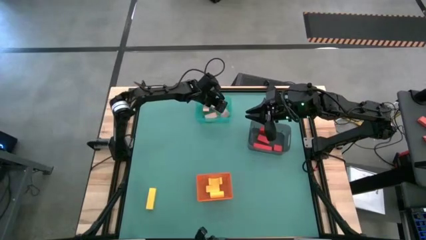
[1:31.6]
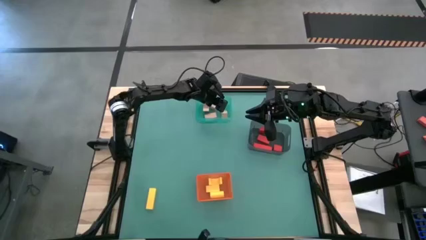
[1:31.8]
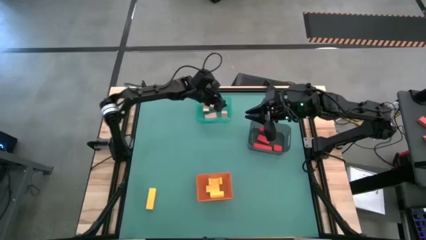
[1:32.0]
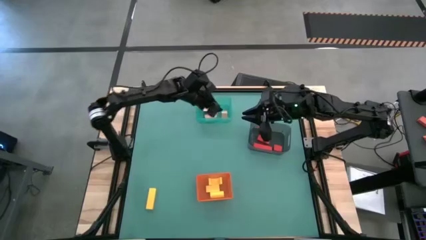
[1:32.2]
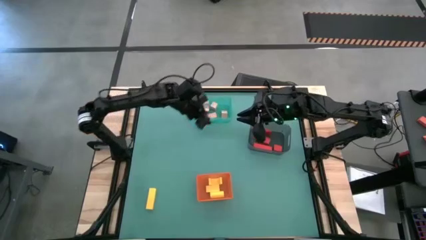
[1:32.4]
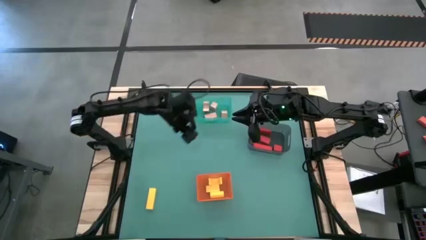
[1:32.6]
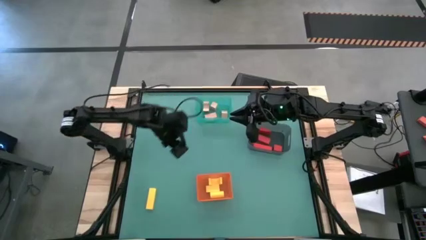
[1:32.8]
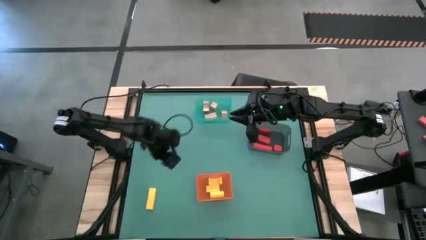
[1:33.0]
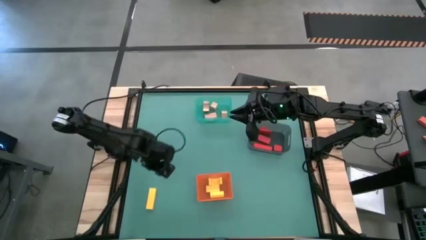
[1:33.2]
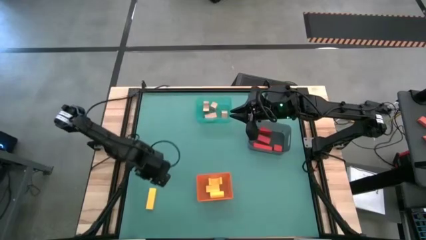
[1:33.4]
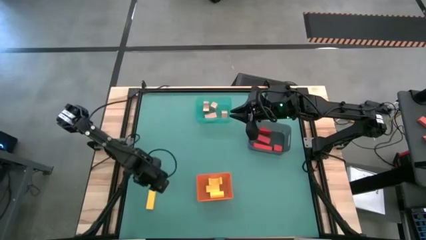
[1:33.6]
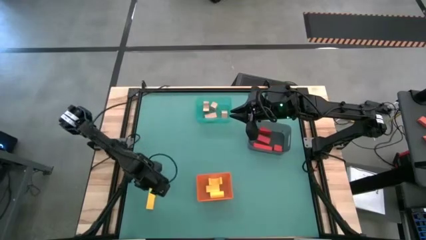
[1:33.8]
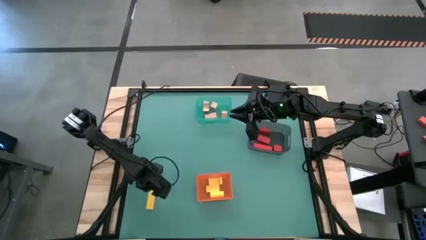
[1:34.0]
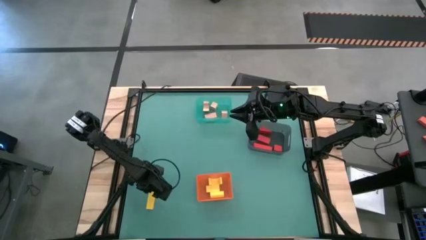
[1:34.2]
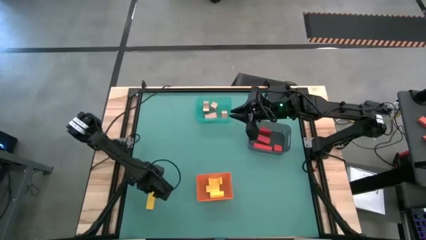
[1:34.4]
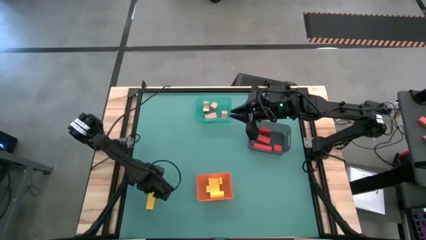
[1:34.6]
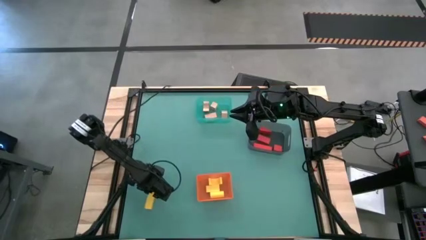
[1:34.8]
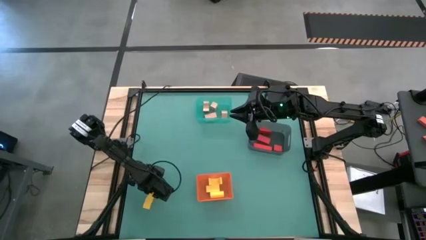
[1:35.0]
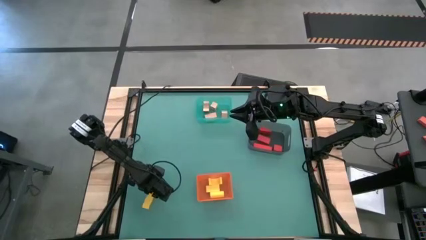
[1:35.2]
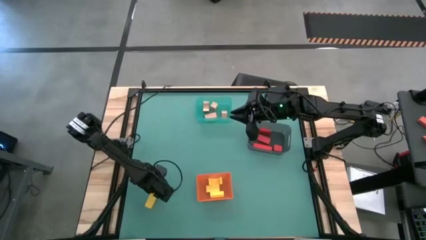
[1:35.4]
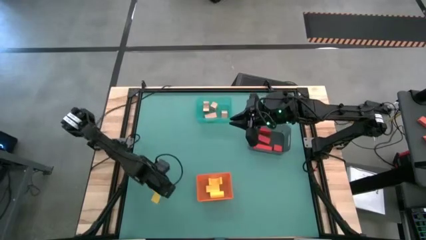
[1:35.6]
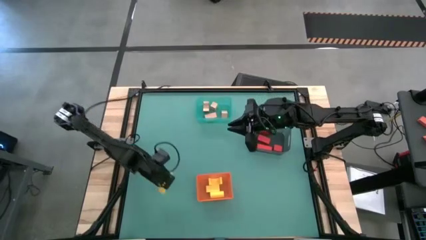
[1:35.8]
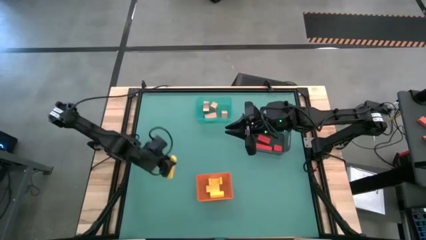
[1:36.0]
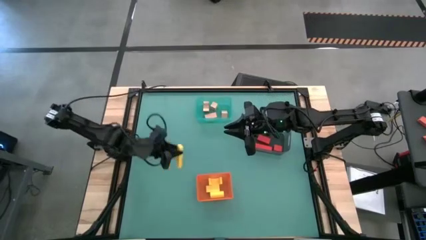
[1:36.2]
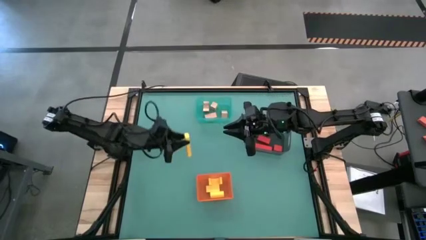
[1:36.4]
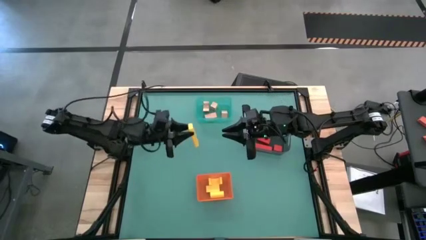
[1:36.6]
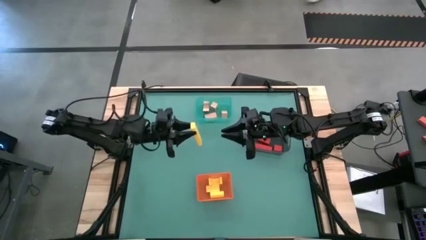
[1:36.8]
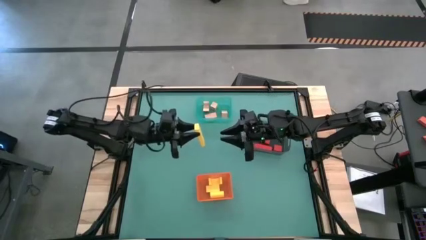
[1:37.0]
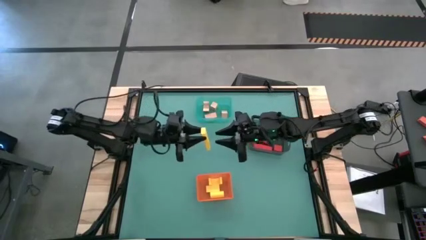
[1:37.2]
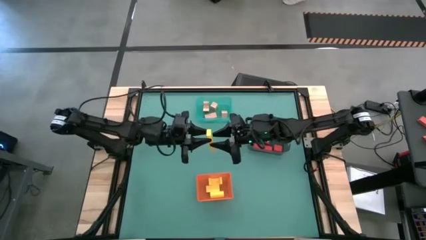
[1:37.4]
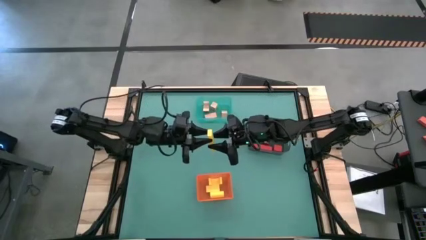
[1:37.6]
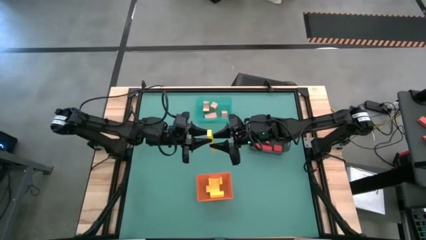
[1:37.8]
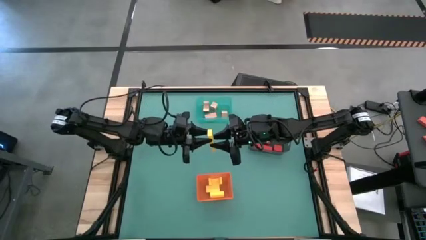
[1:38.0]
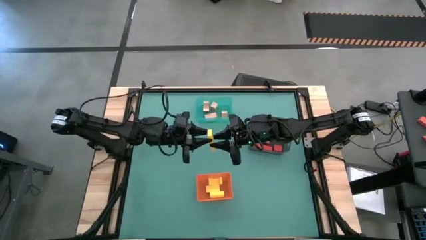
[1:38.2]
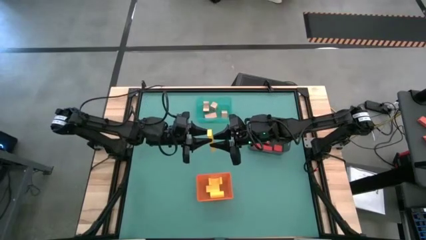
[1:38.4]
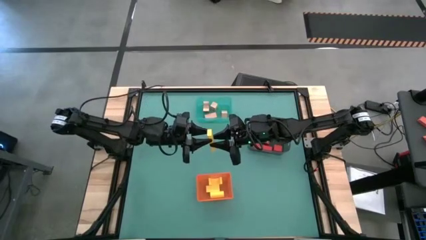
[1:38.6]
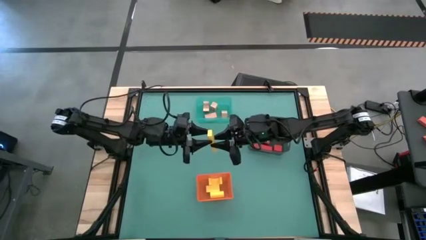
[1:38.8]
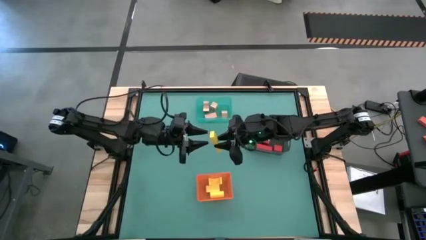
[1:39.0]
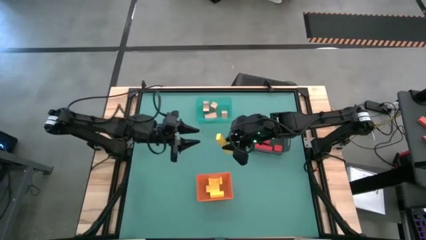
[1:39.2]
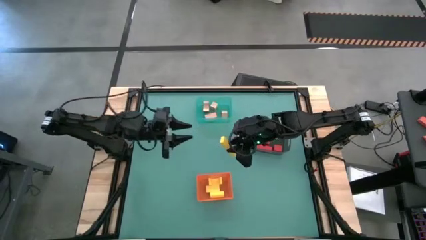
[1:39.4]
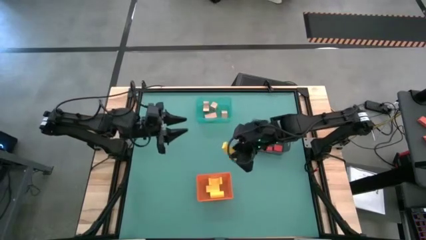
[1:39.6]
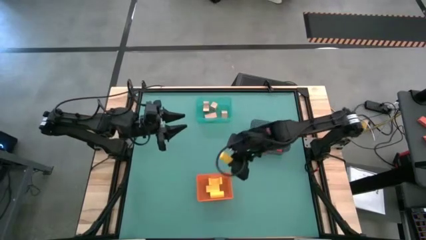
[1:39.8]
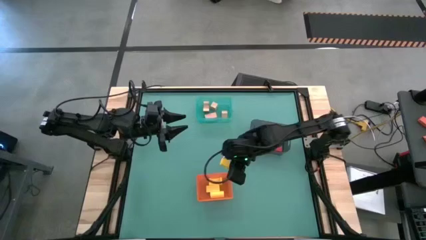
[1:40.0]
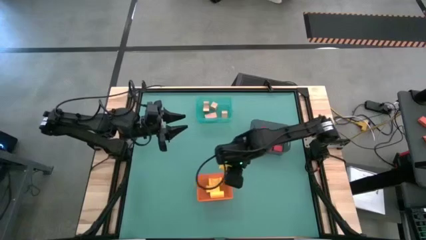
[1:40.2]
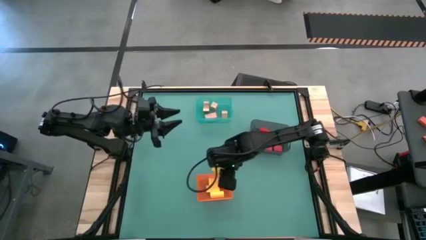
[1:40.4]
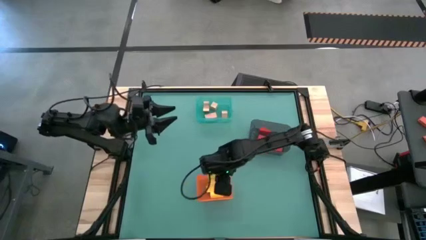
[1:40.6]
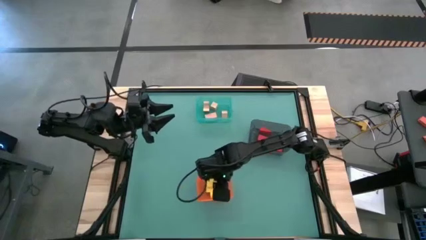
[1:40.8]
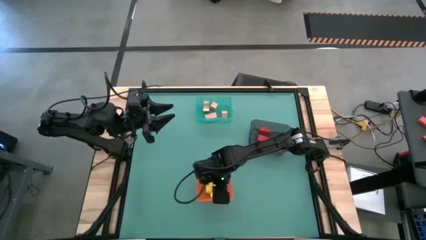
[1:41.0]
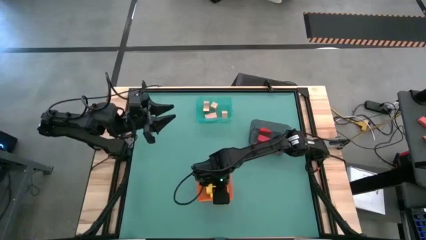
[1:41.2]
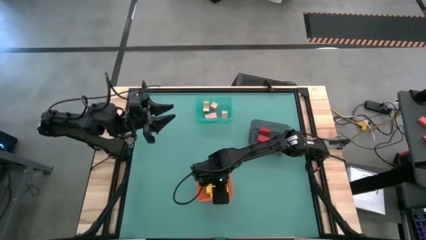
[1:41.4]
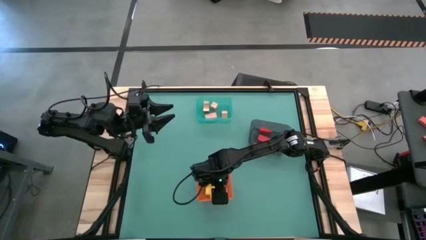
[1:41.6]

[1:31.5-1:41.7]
Task: Sort & place blocks by color
Put the yellow block into the orange bin

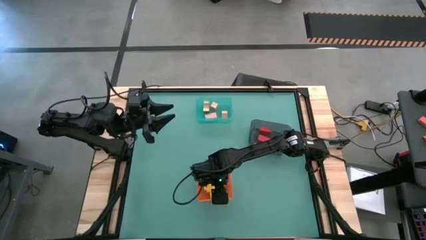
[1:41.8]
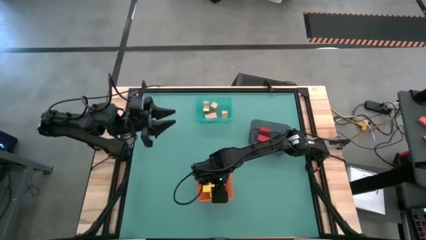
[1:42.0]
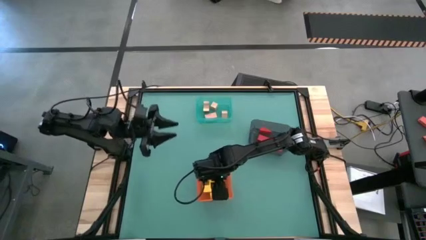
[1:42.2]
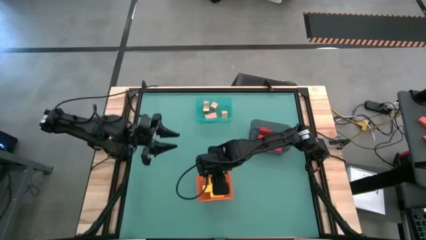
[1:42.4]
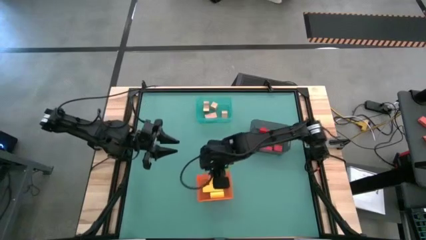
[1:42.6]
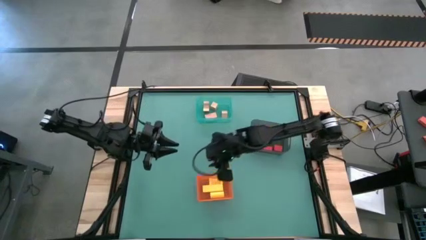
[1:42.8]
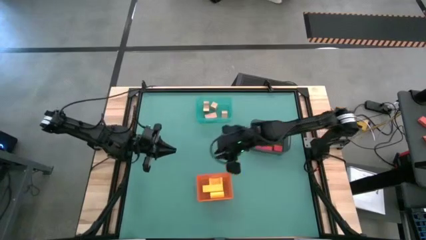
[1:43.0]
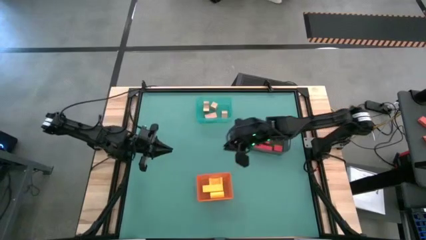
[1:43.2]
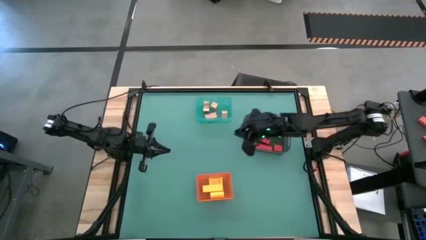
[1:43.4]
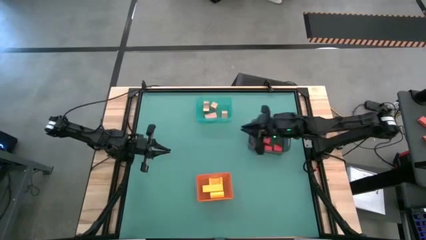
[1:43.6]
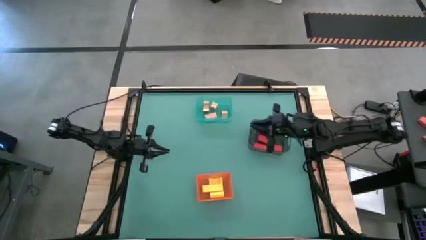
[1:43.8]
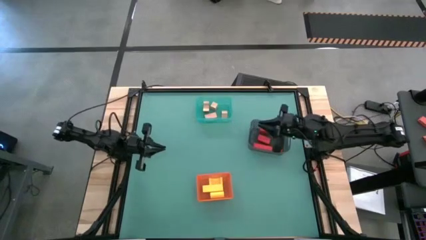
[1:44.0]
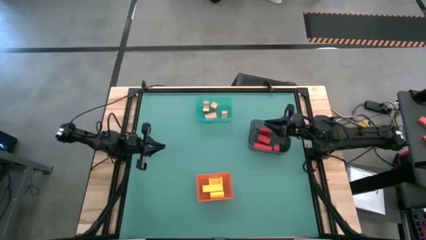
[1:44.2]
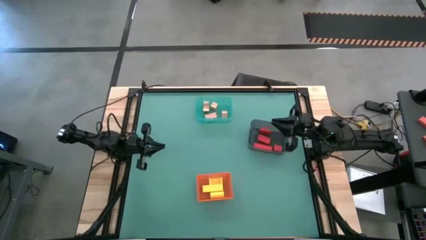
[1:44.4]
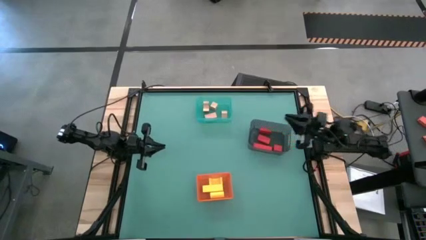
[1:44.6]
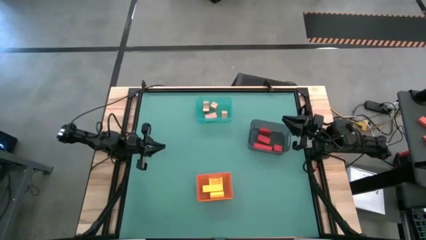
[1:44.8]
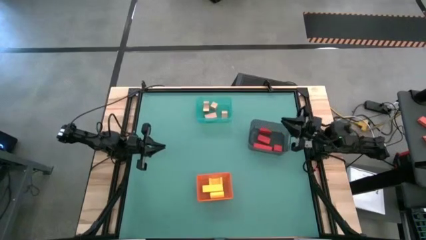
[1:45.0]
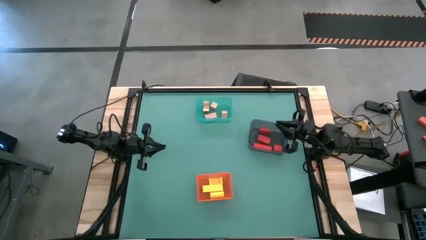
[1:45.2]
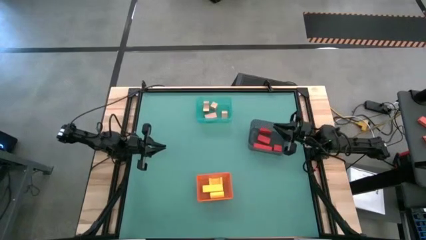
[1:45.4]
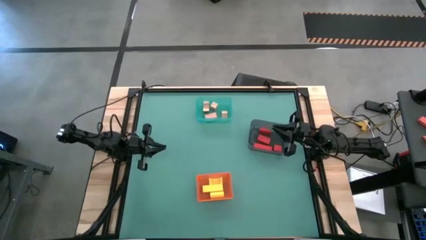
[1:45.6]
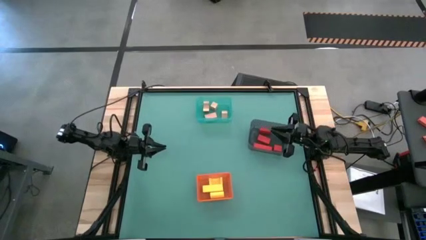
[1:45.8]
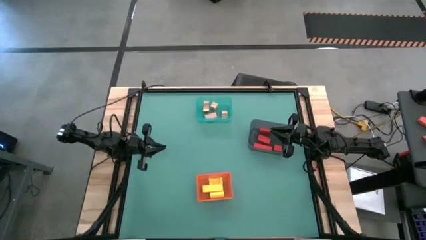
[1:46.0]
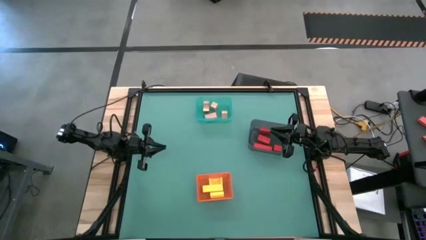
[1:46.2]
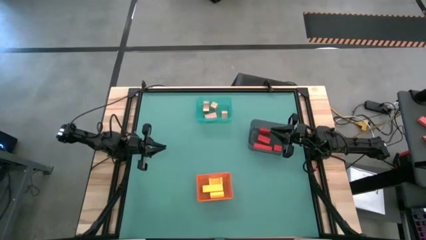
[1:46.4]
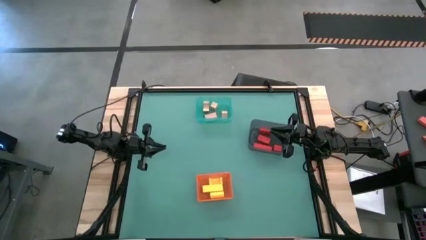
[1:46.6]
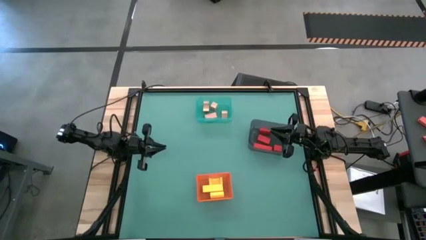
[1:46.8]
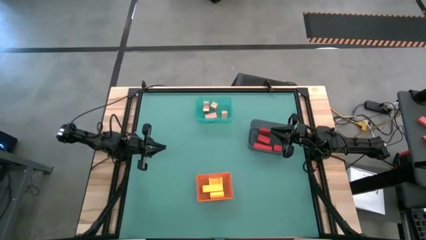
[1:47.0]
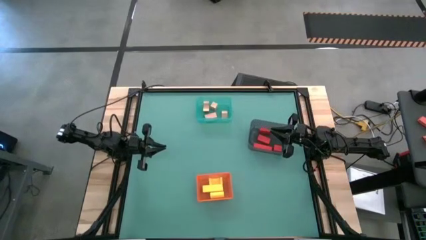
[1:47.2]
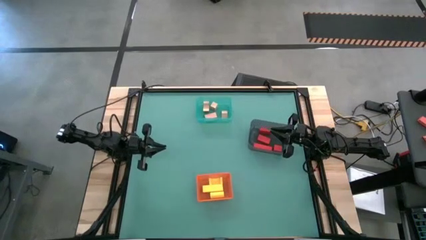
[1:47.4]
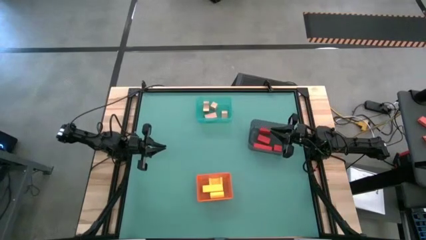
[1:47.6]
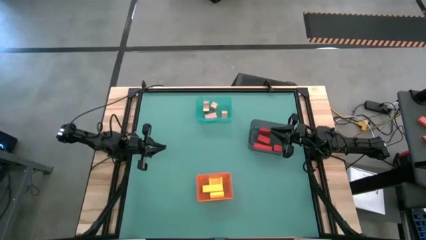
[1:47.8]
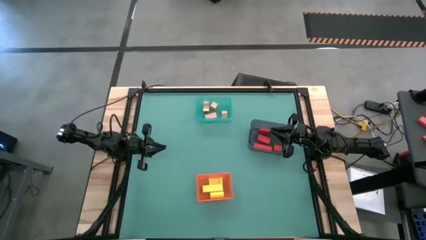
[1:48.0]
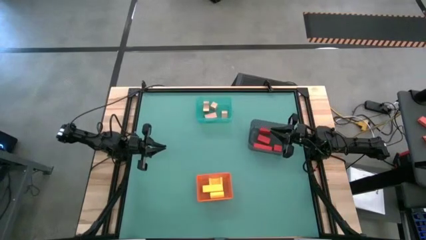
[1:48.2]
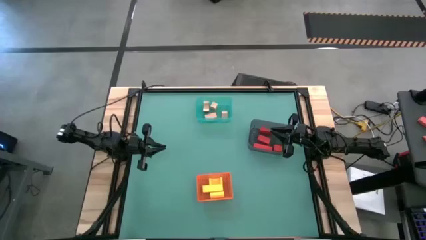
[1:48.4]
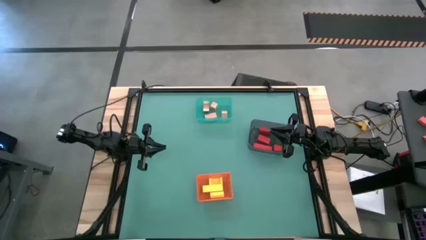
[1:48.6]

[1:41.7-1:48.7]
Return to Home Position
